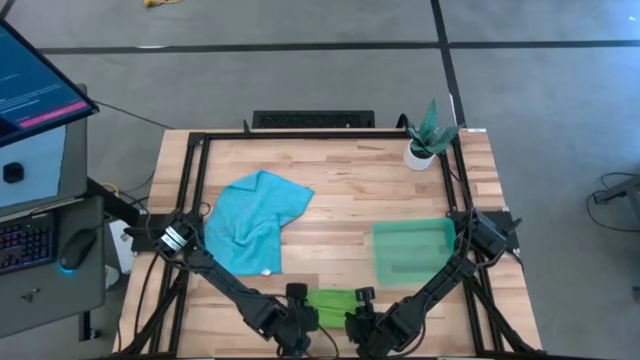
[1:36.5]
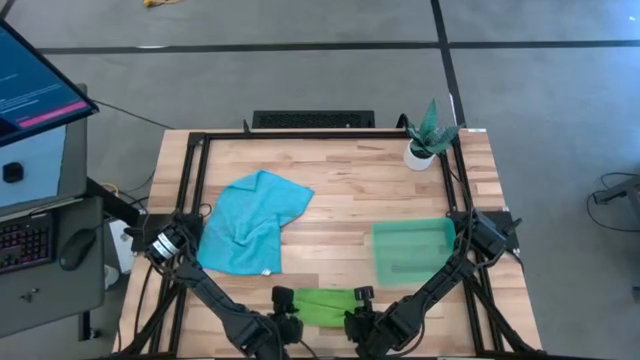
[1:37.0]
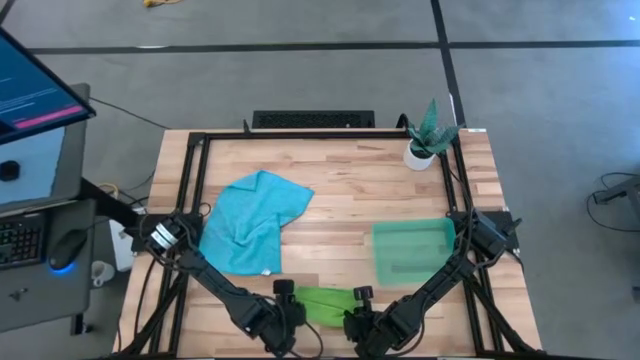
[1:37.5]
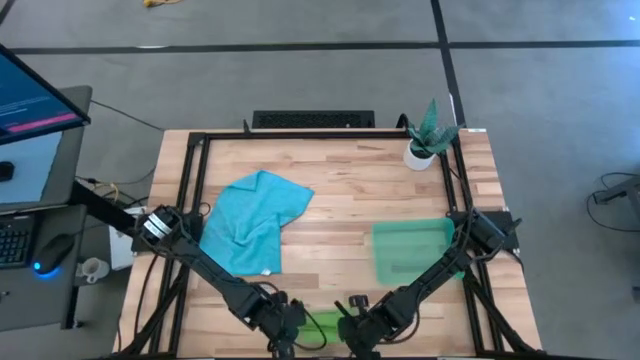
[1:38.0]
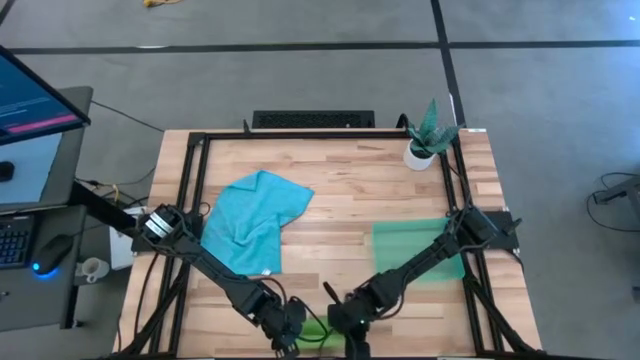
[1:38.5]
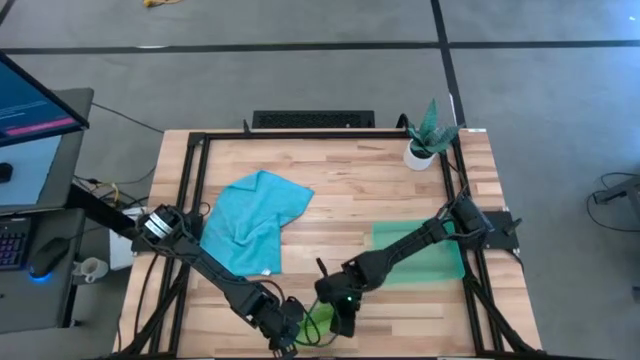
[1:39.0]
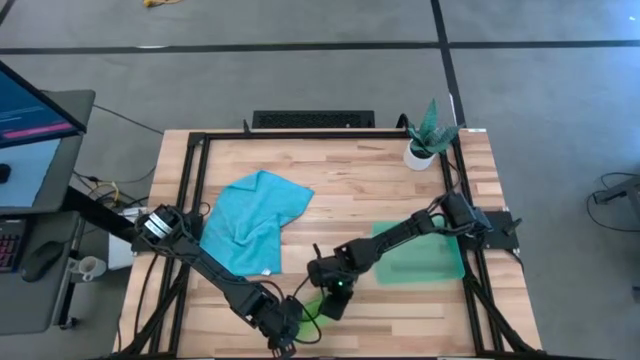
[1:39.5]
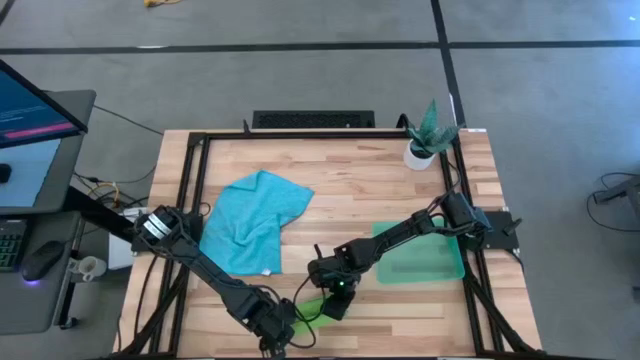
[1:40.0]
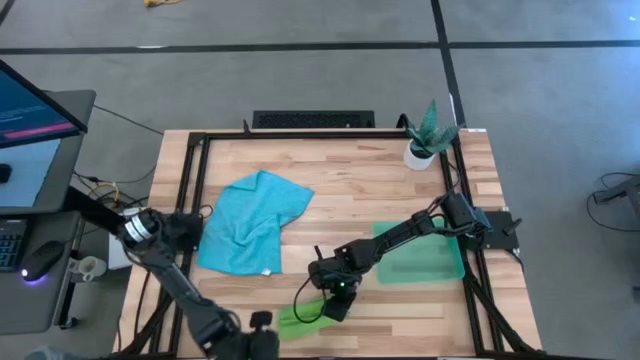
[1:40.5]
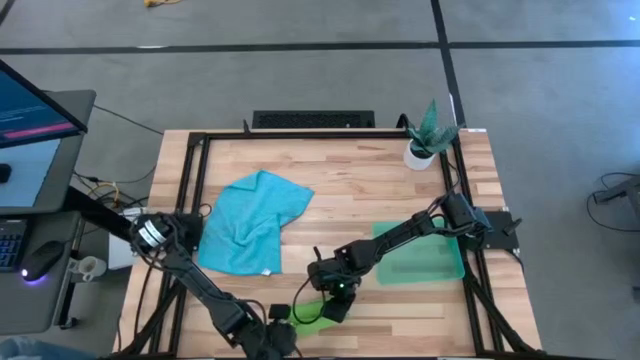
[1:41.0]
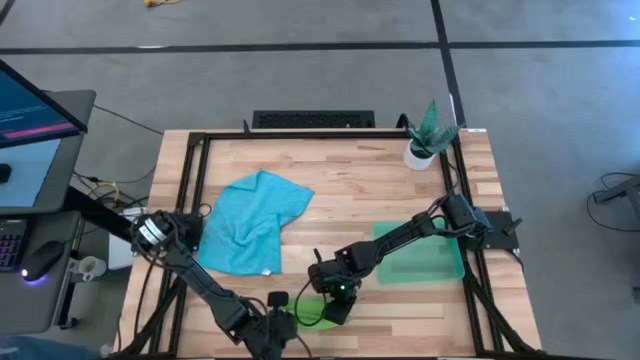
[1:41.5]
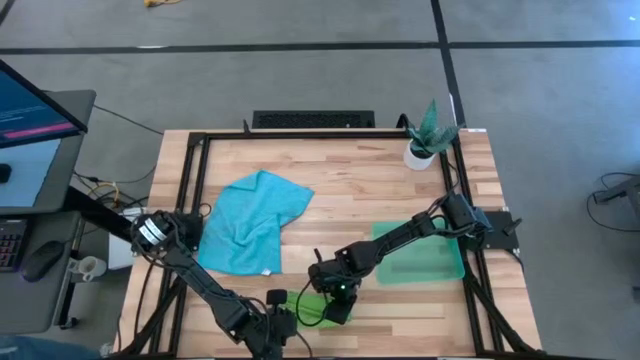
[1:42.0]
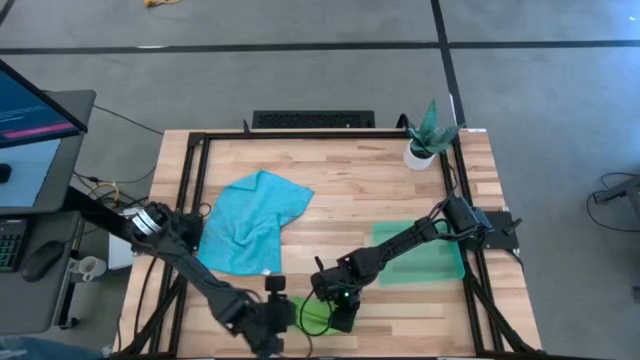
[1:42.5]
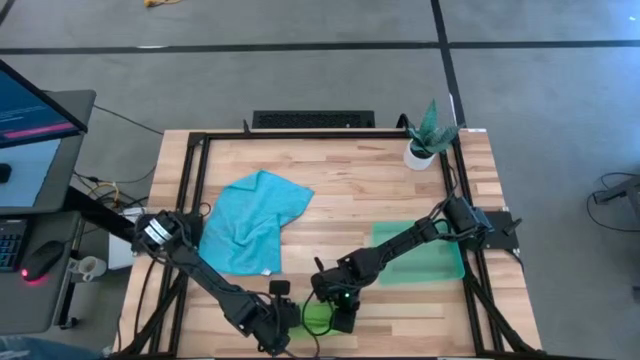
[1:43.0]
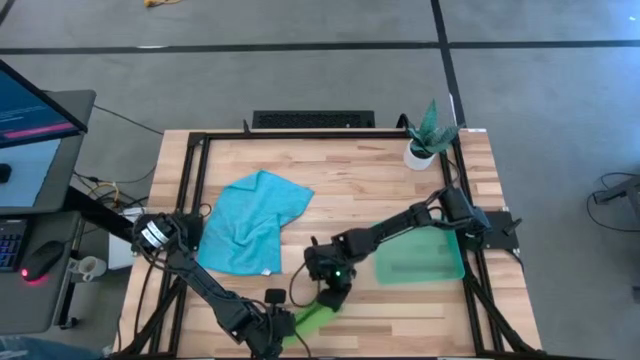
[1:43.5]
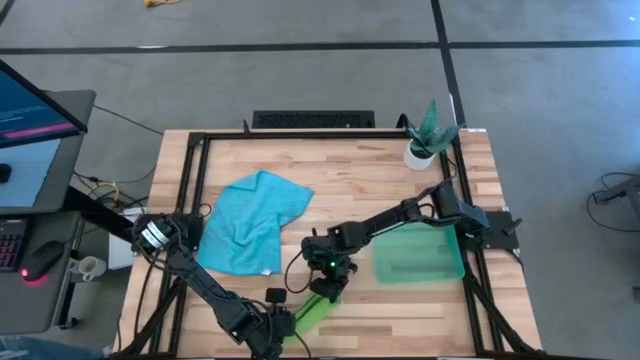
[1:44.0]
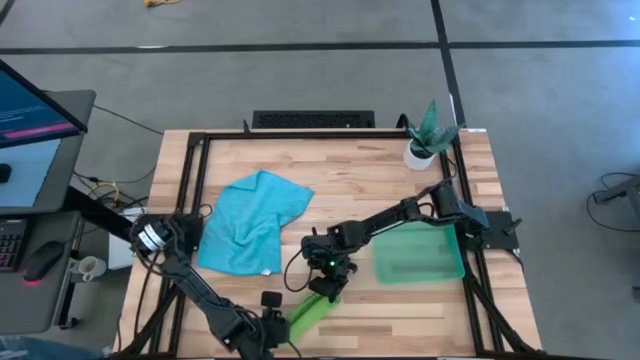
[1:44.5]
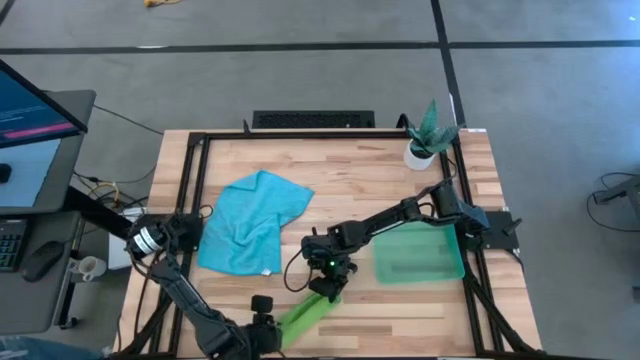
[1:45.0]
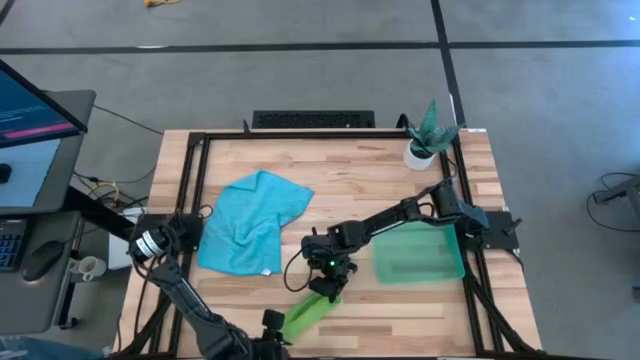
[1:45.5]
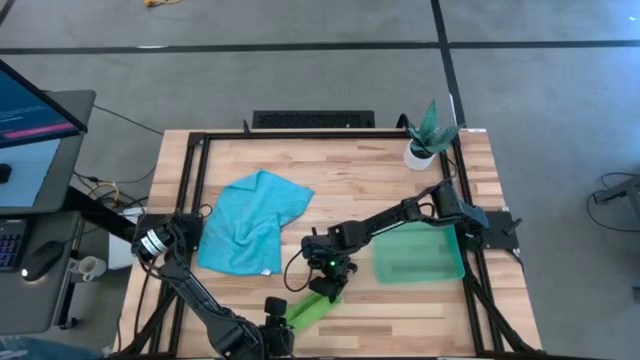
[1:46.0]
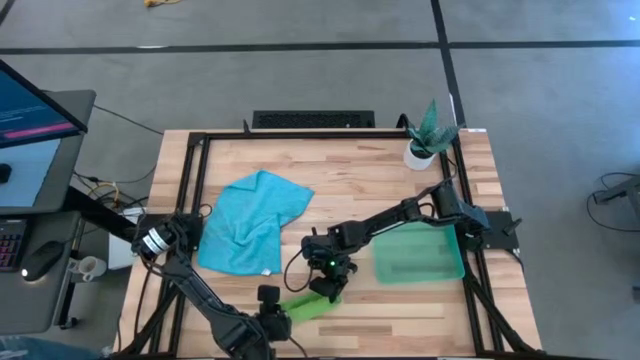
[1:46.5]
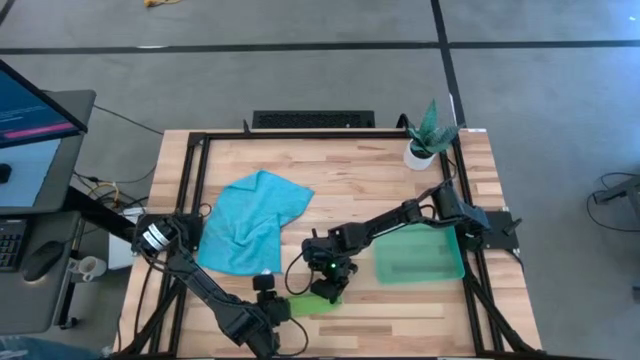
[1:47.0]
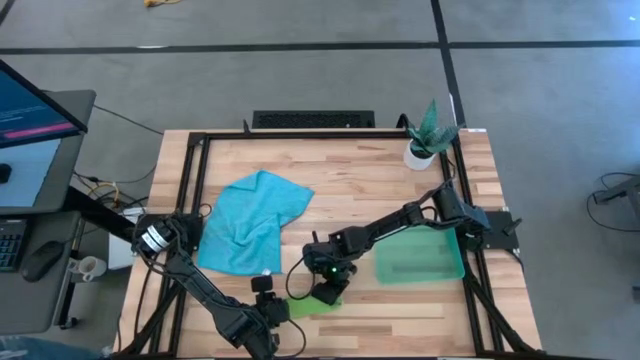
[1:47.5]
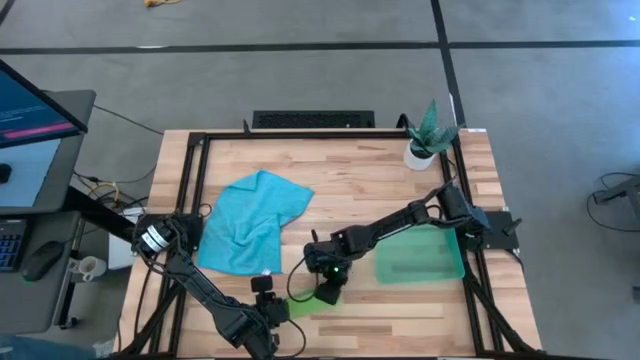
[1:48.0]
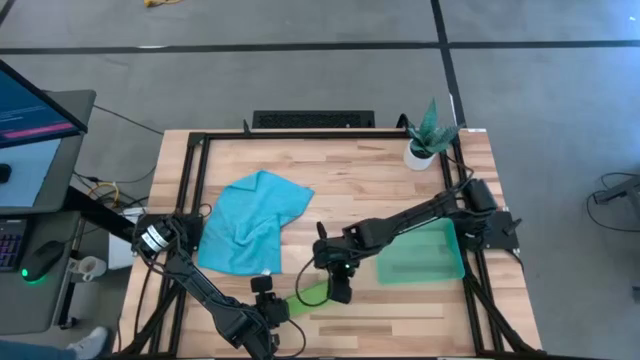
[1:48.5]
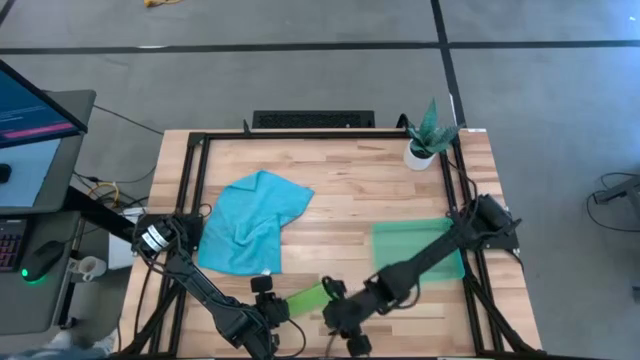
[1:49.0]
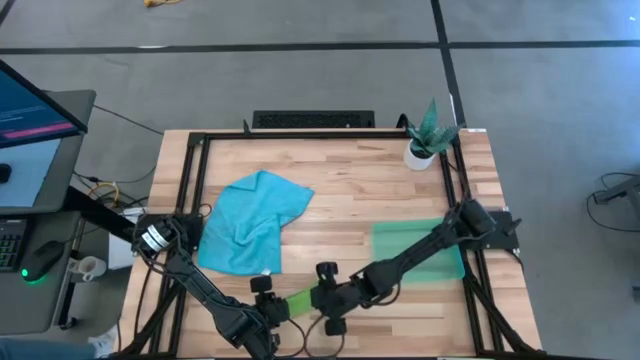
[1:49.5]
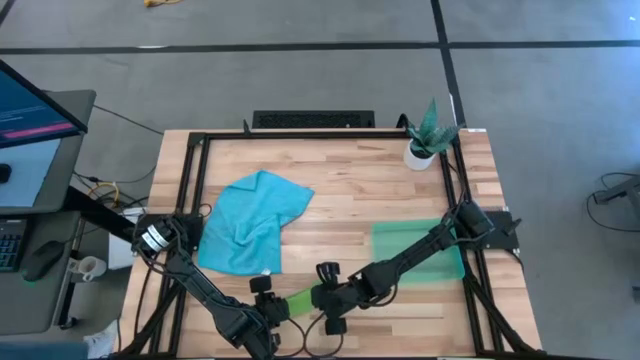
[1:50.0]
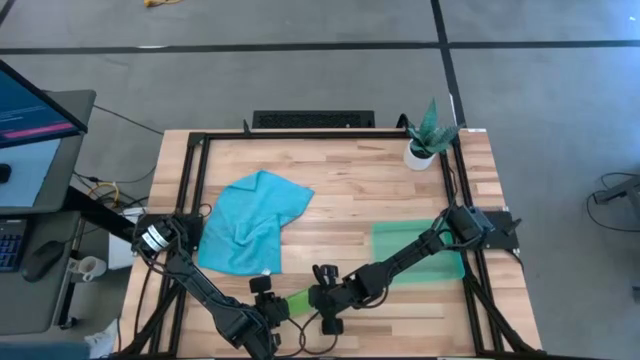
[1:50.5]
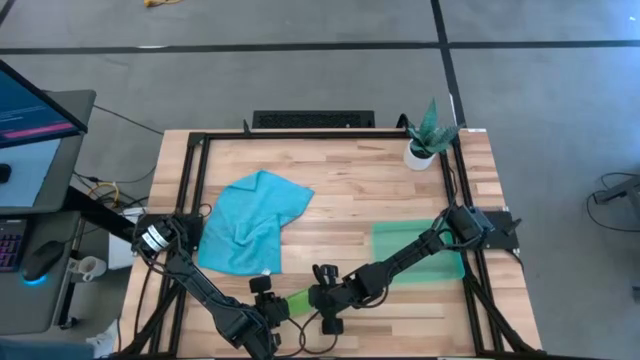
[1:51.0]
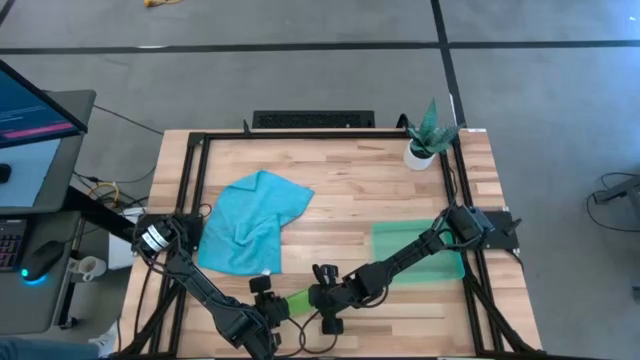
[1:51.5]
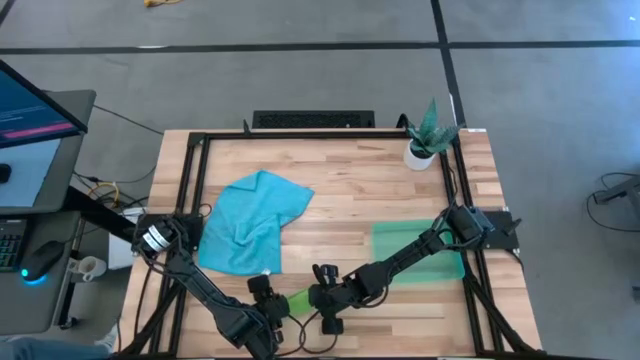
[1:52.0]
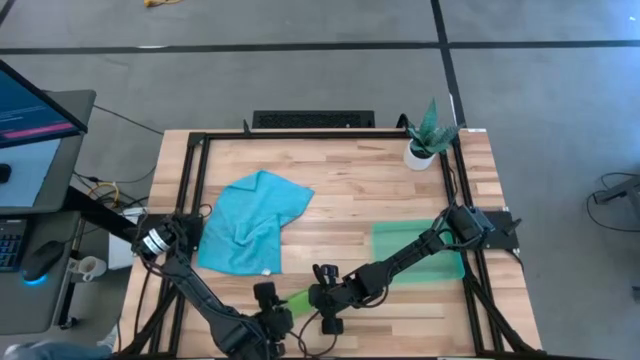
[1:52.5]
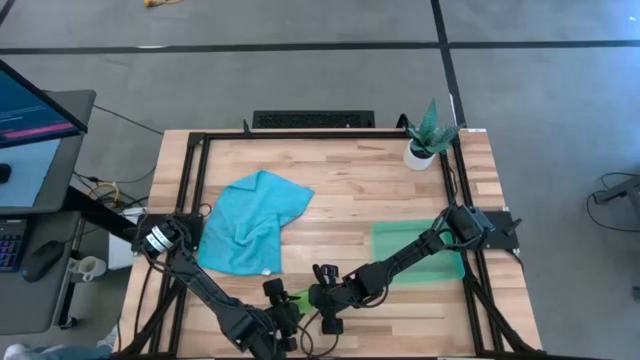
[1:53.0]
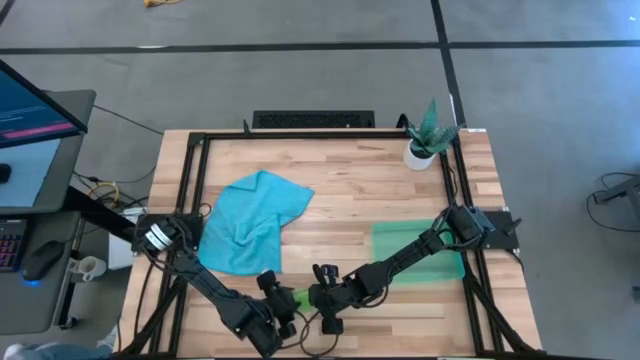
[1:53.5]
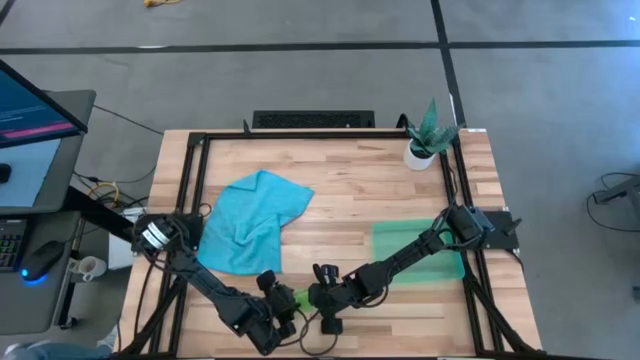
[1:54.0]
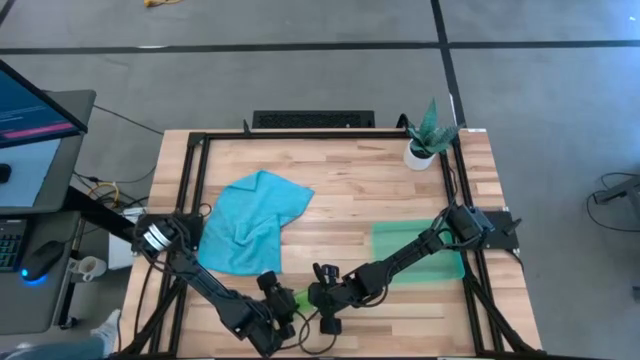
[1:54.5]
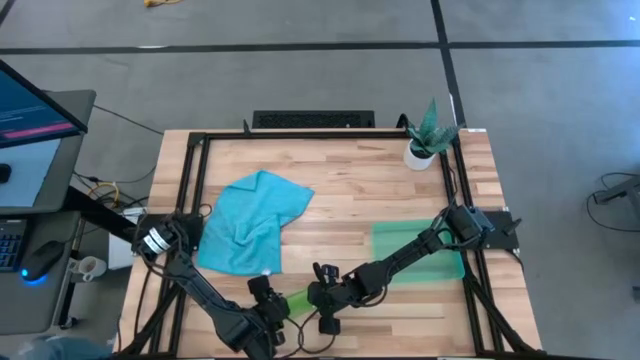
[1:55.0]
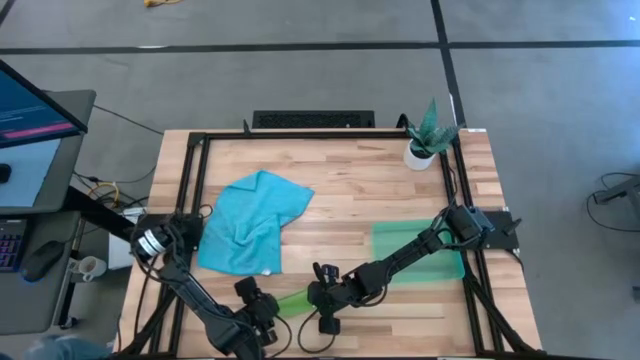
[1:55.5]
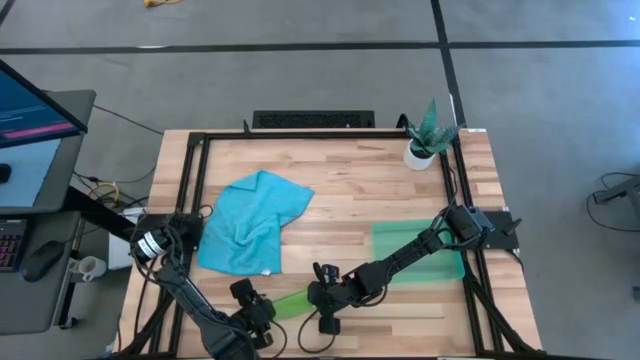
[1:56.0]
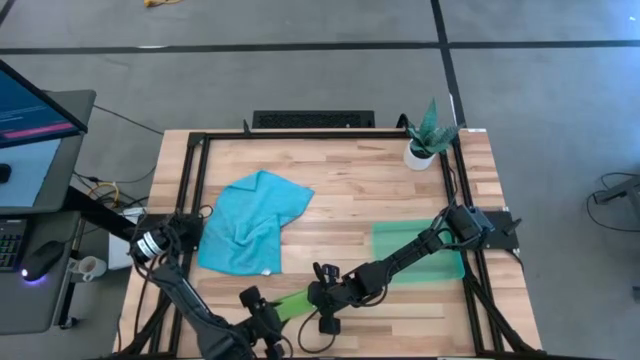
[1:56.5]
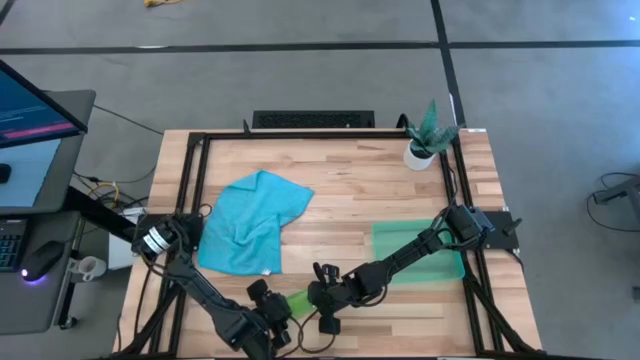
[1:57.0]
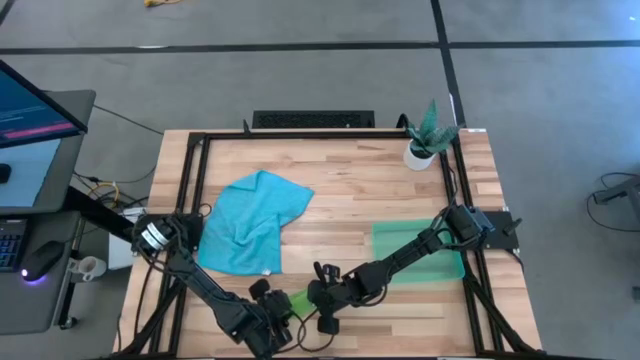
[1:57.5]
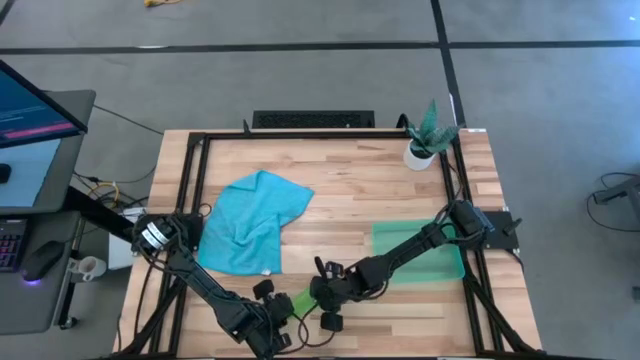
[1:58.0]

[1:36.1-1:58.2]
Task: Roll microfiber towels into tight, uniform cylinder then place into a basket
Roll the green towel
